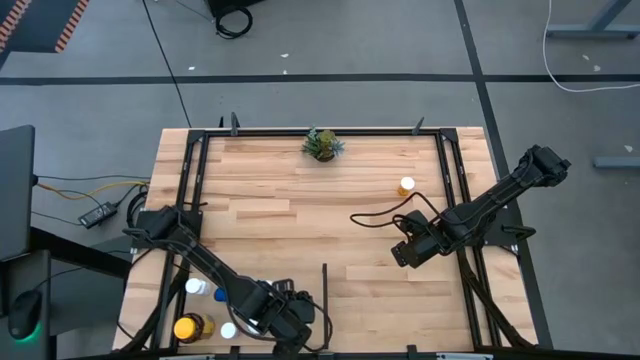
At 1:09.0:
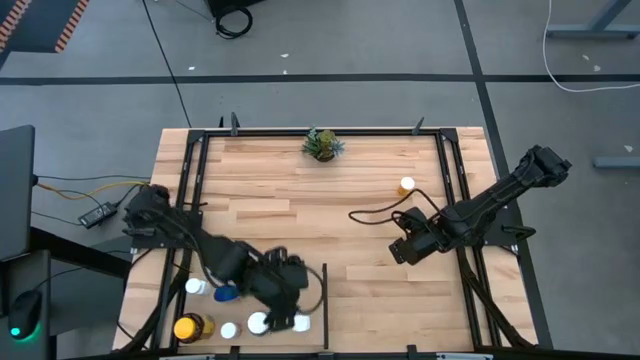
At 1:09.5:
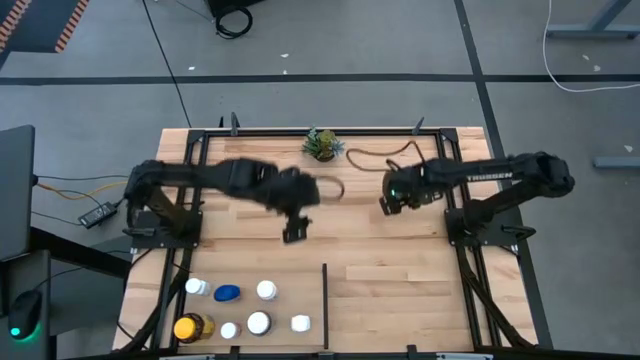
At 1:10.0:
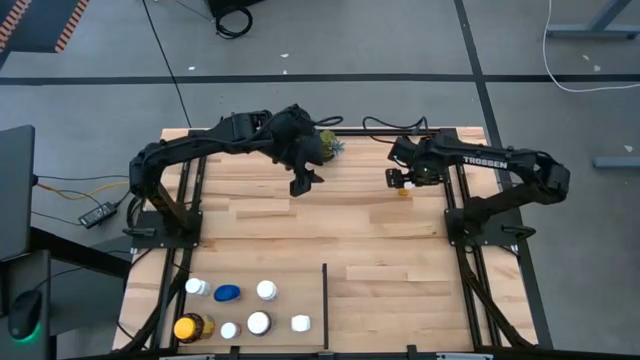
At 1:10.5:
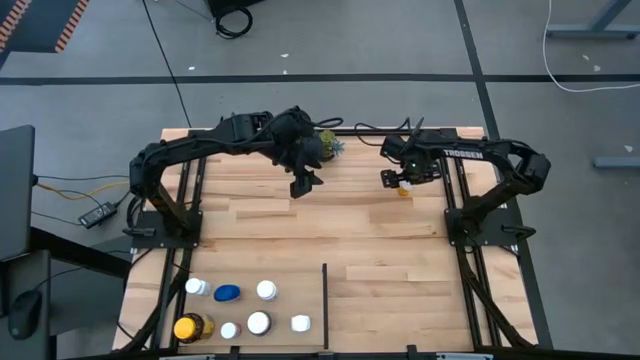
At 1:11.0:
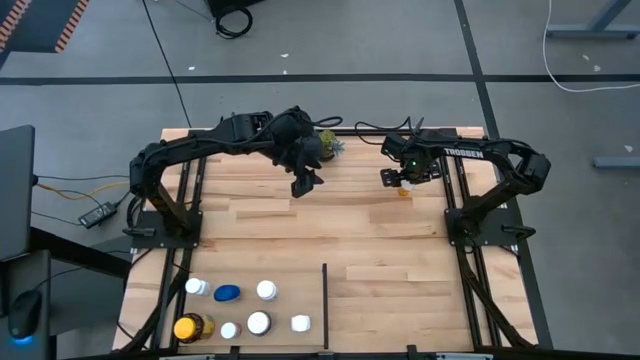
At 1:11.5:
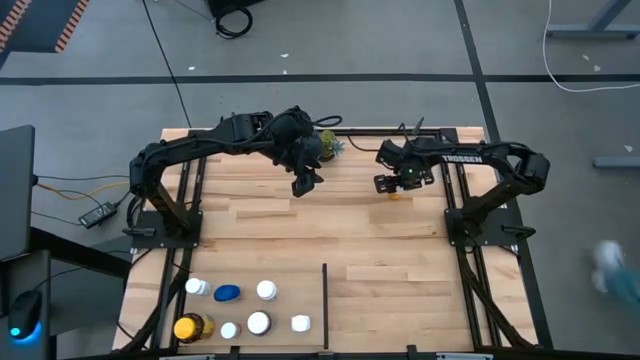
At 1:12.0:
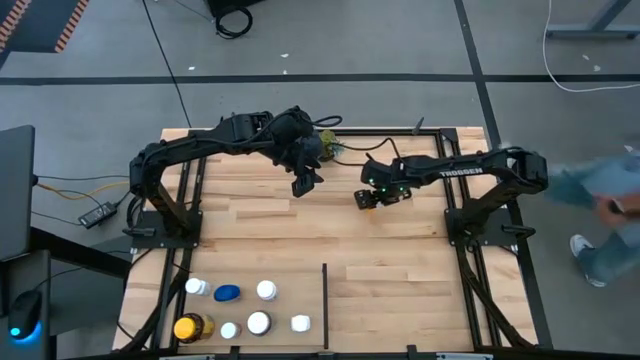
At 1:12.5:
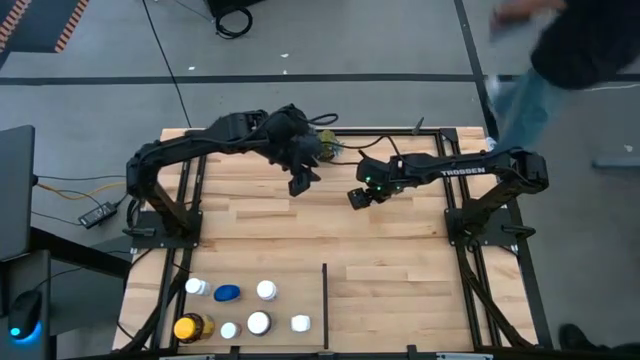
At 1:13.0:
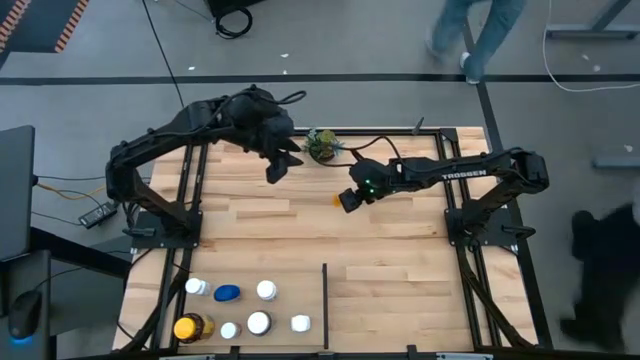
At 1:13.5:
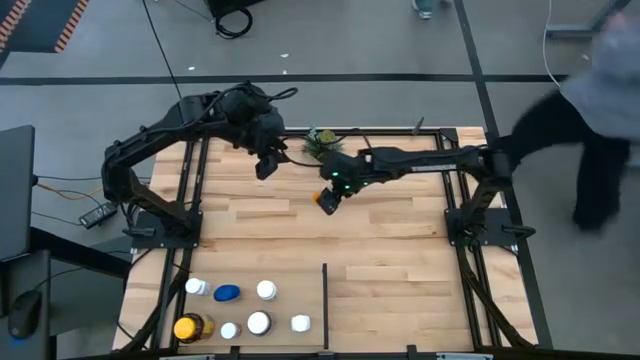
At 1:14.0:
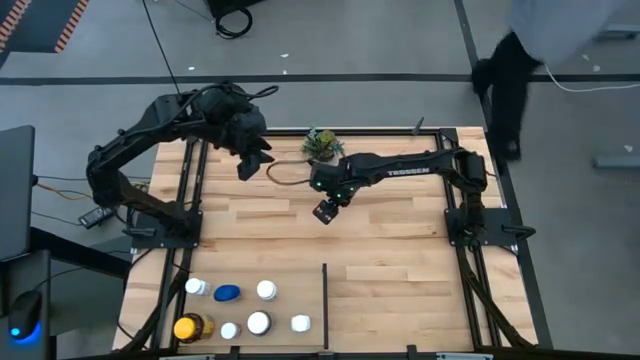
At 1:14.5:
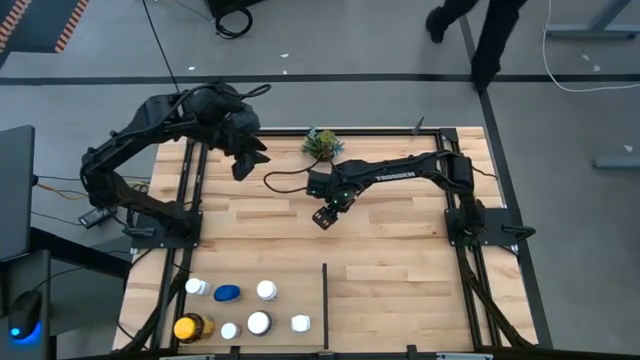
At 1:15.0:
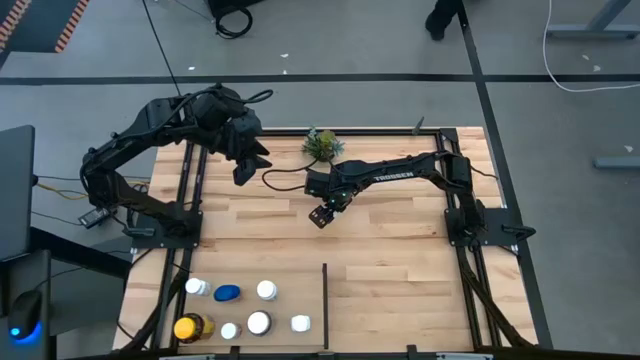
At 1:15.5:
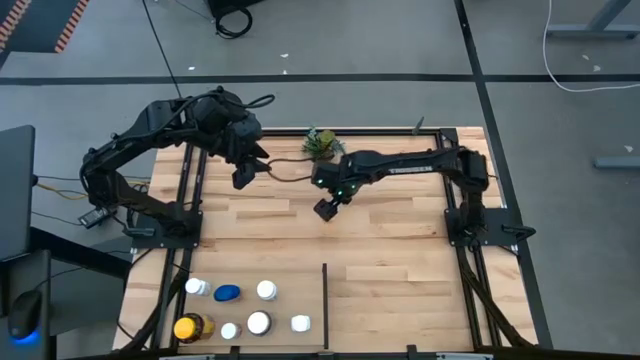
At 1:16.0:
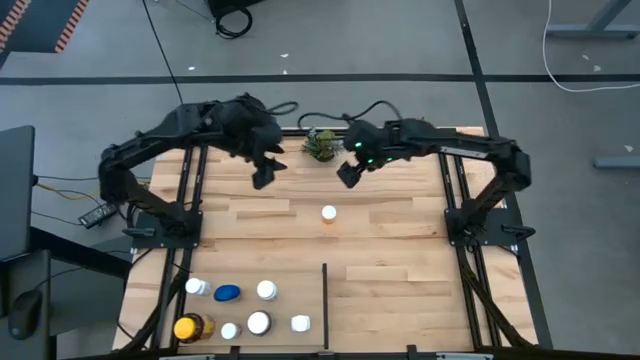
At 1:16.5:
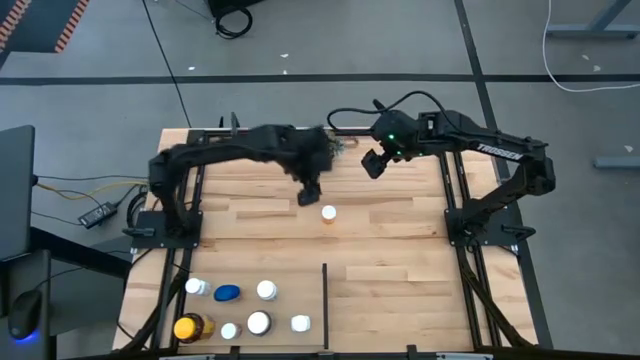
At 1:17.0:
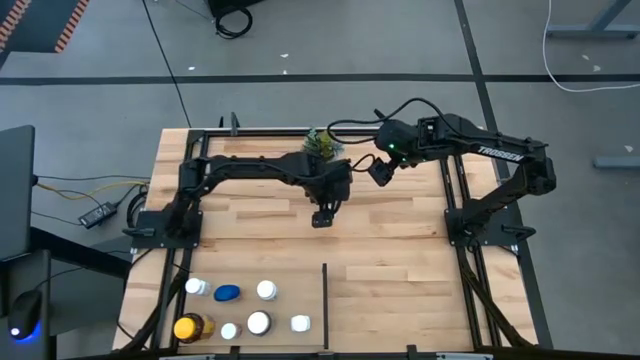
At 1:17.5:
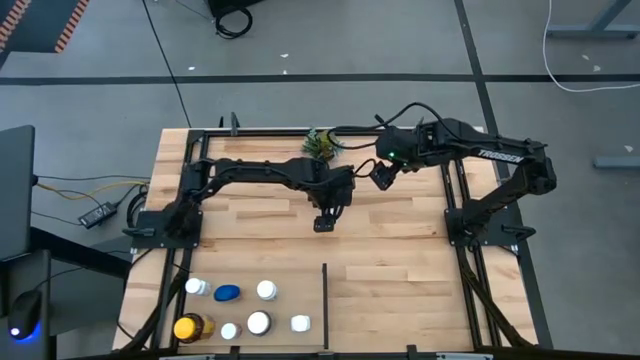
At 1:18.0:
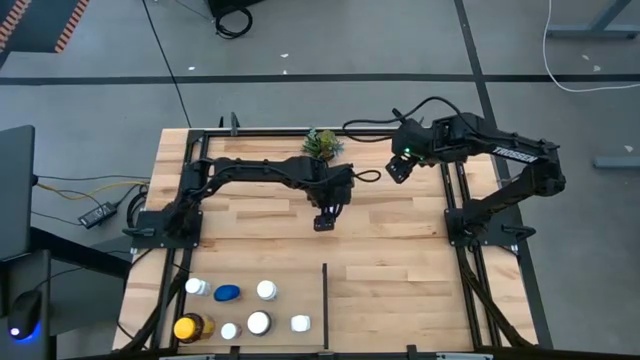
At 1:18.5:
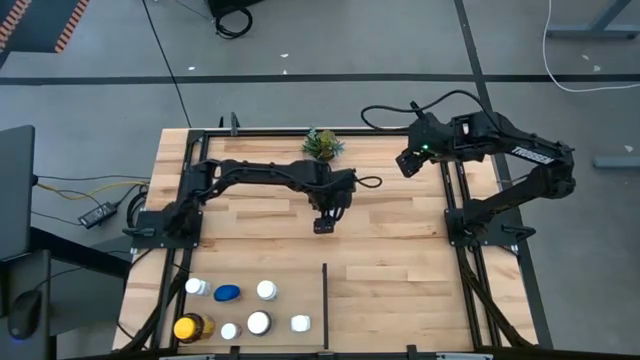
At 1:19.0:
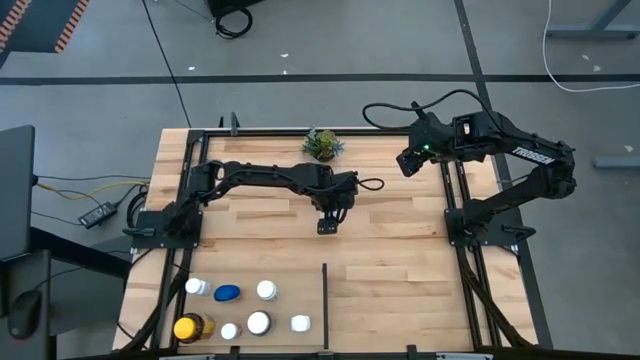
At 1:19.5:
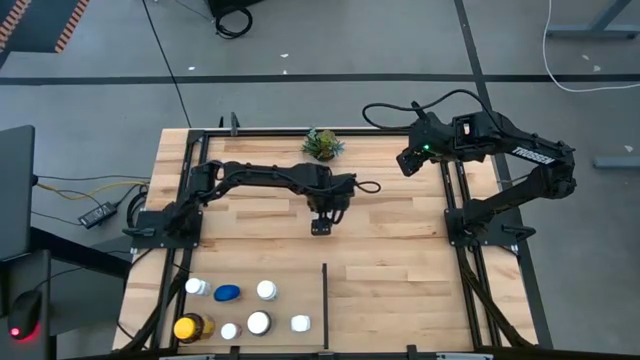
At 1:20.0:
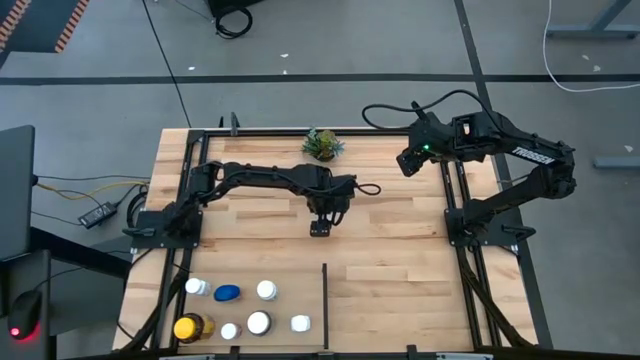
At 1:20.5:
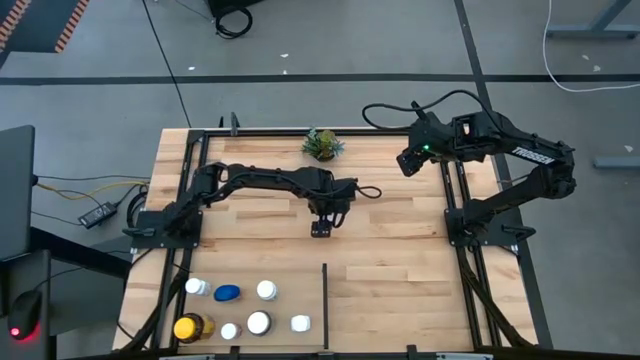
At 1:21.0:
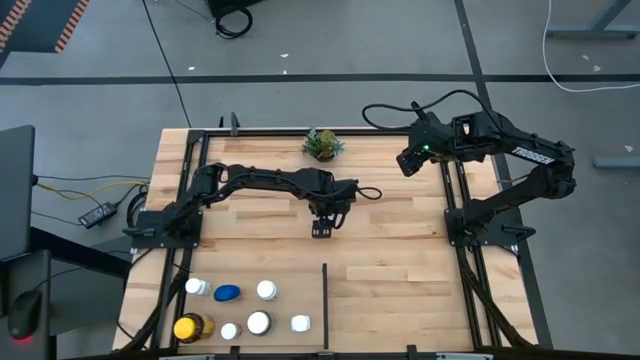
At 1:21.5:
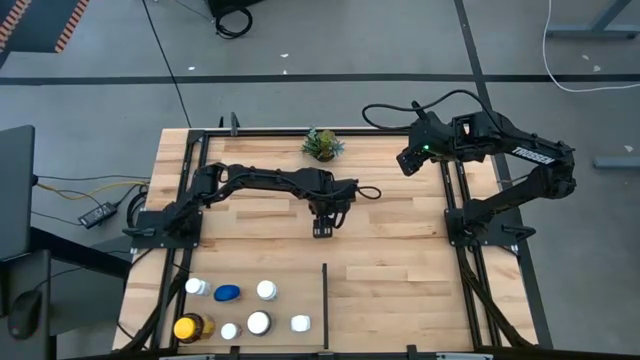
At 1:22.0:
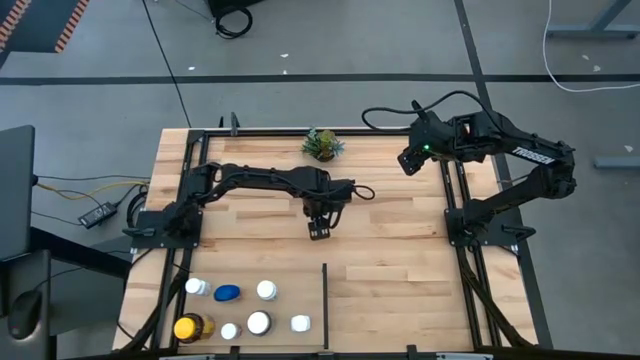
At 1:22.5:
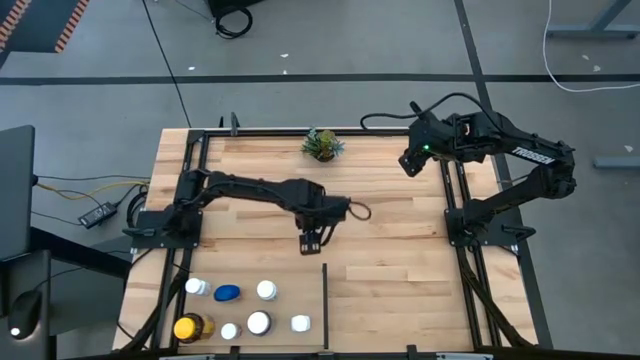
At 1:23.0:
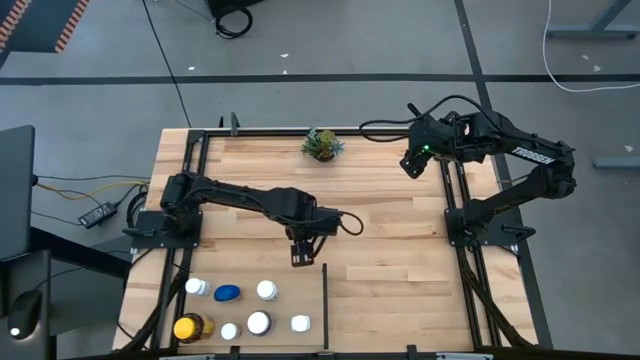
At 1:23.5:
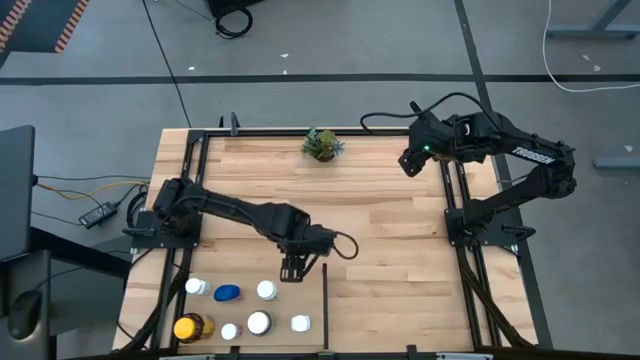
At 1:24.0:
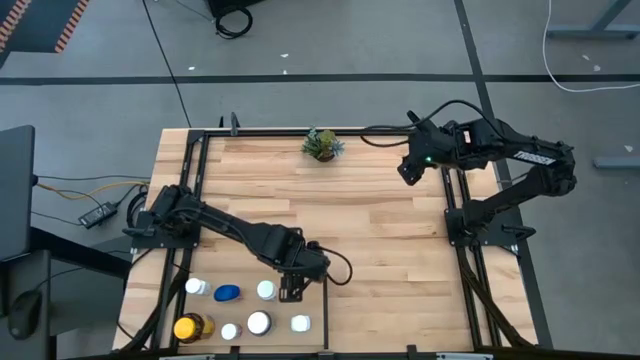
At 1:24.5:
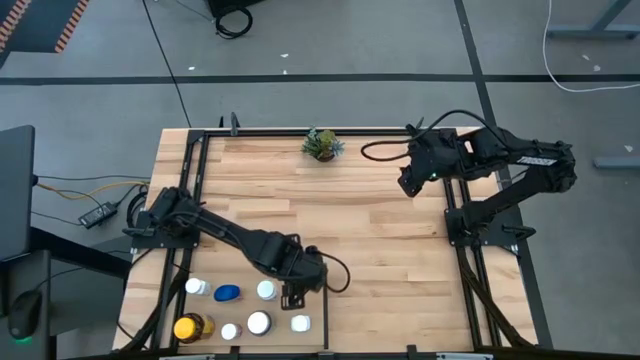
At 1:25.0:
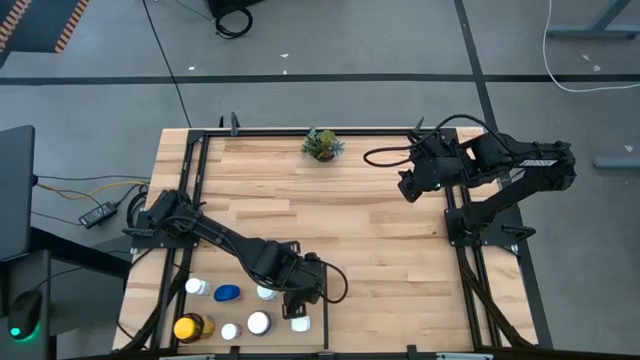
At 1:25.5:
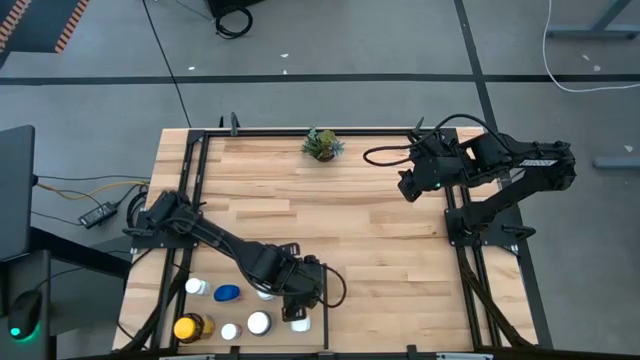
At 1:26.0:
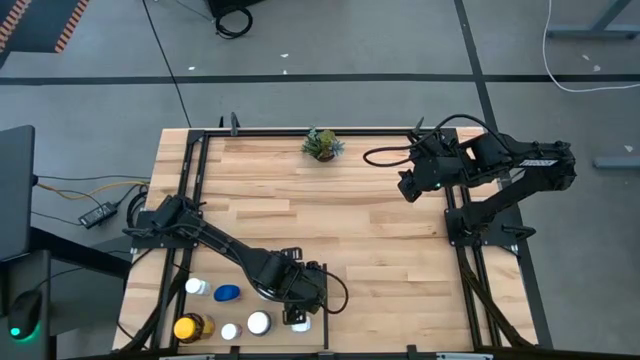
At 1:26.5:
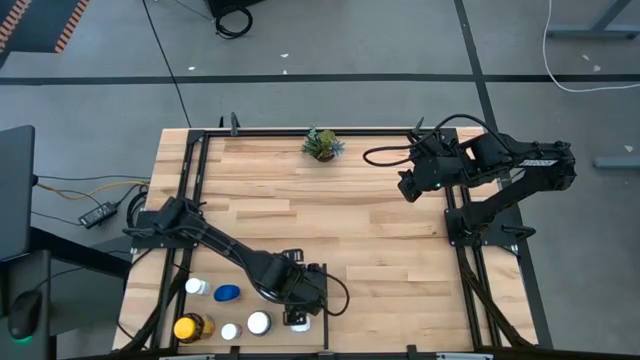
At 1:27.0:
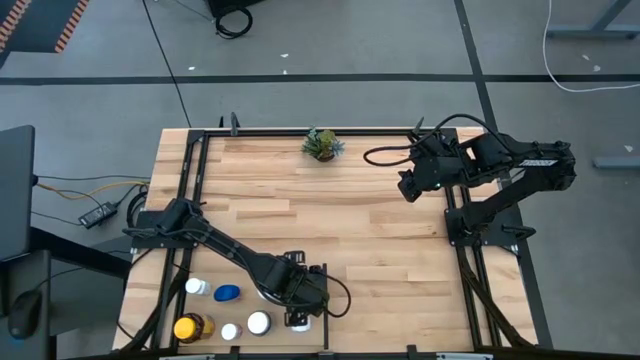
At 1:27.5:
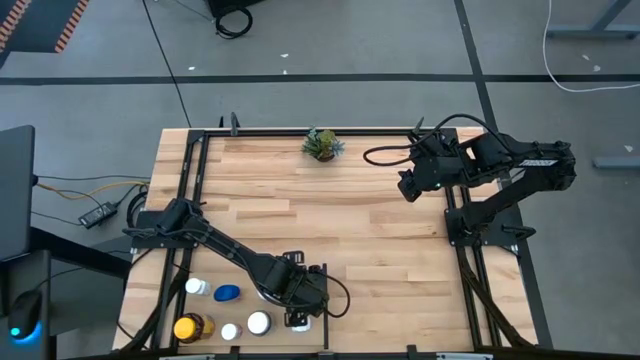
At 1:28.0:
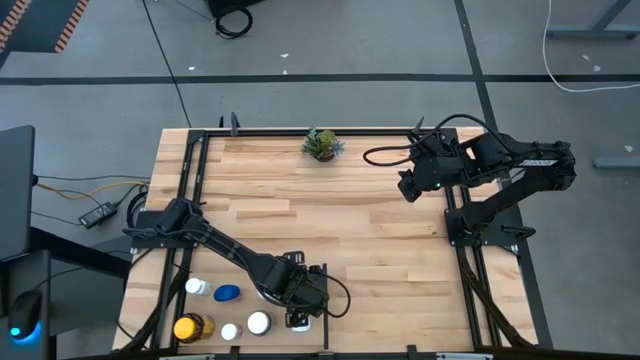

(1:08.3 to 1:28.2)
Task: Pick and place medicine bottles onto shelf by color
Put the orange medicine bottle on the shelf

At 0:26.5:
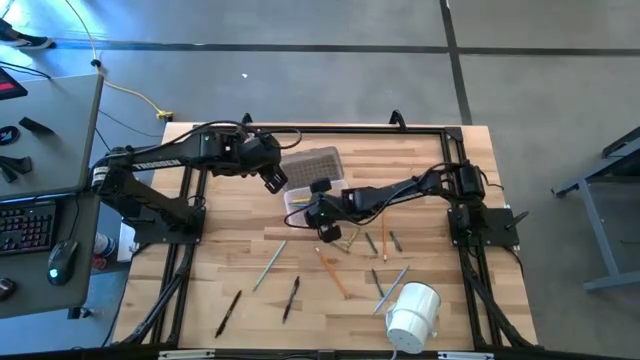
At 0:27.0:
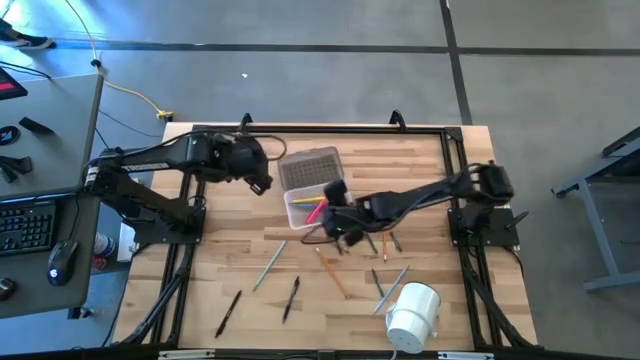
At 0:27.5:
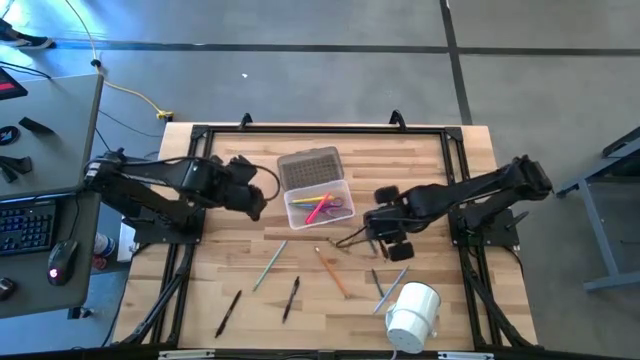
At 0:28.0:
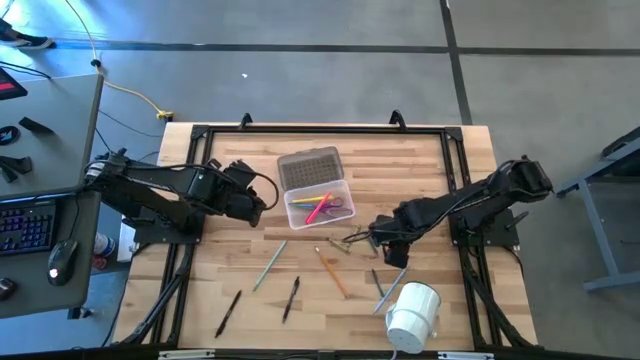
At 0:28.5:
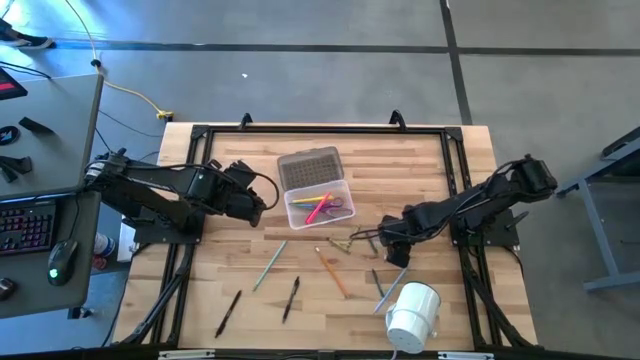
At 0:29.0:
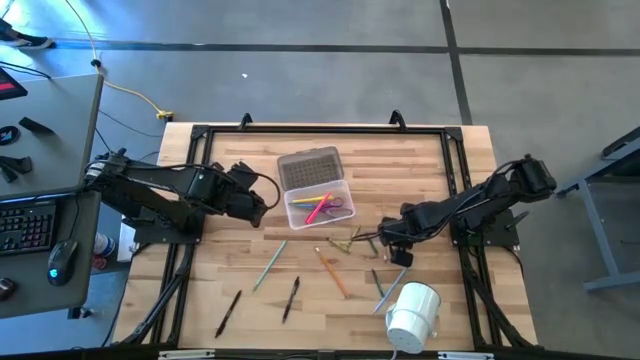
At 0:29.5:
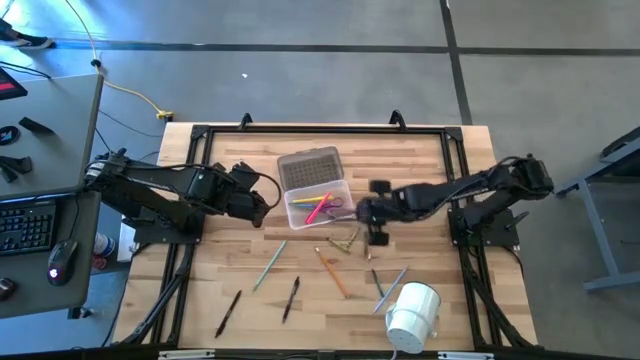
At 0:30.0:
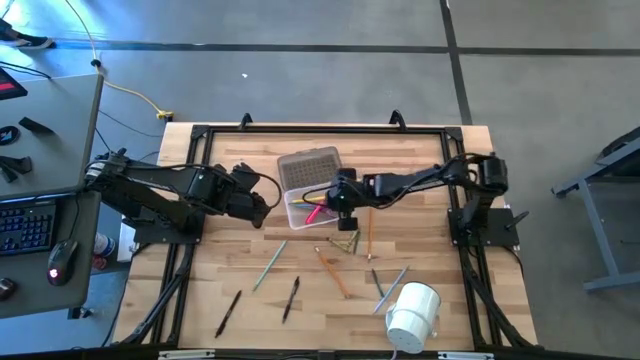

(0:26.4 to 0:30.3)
Task: Pick & place school supplies into a supply box
Put the top right green crayon into the supply box
